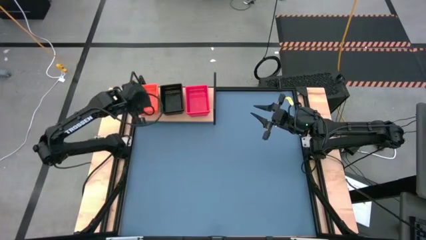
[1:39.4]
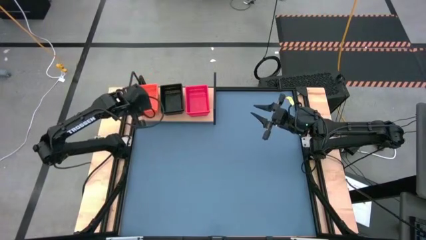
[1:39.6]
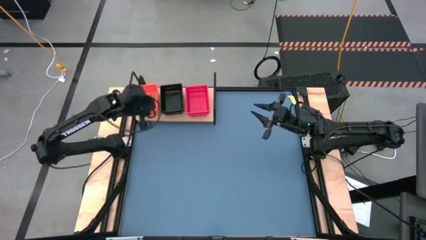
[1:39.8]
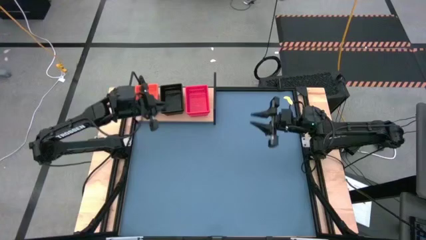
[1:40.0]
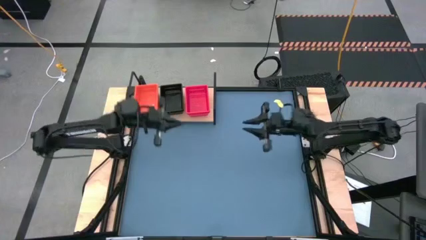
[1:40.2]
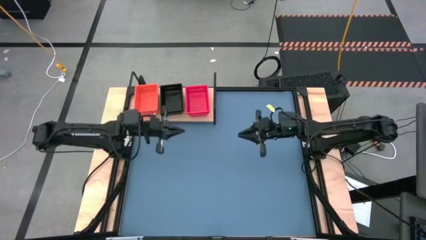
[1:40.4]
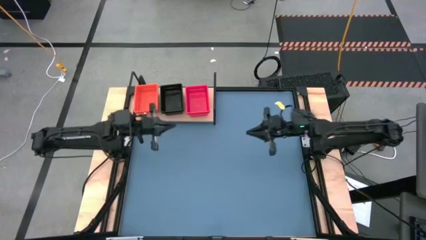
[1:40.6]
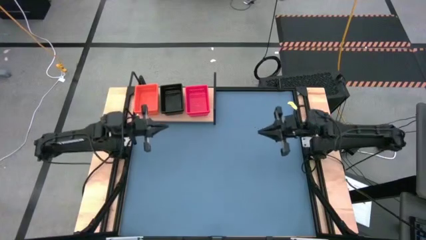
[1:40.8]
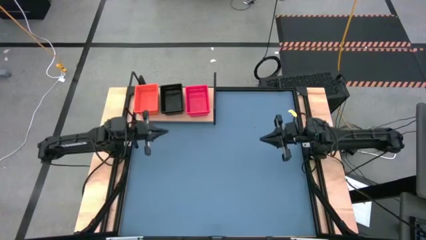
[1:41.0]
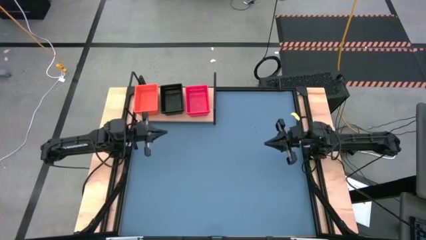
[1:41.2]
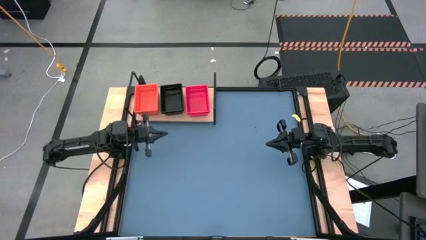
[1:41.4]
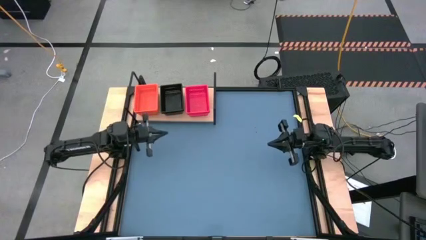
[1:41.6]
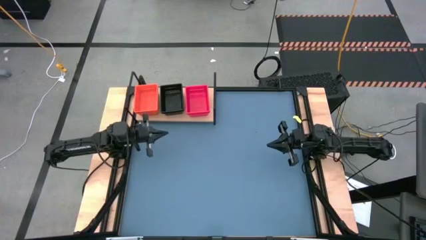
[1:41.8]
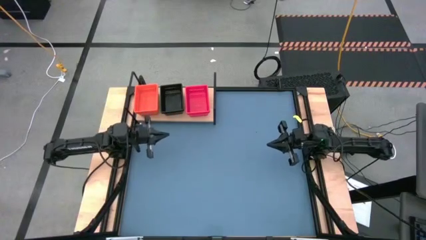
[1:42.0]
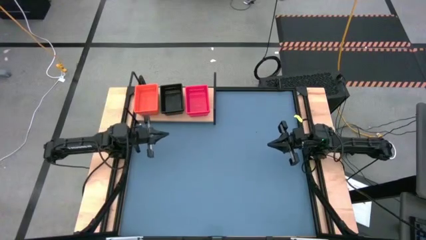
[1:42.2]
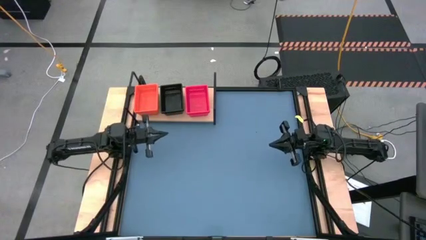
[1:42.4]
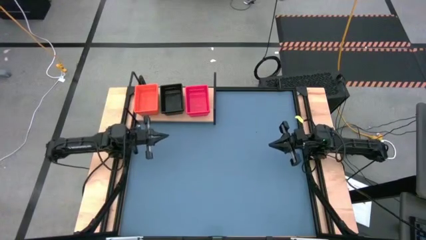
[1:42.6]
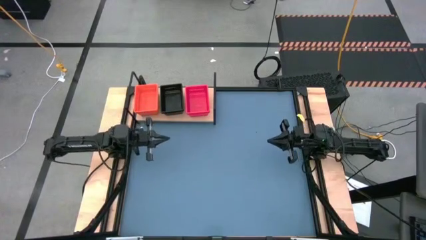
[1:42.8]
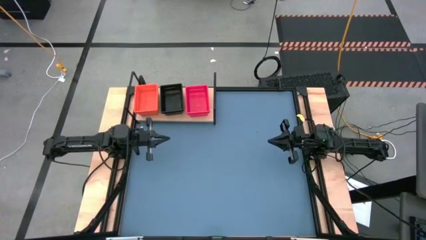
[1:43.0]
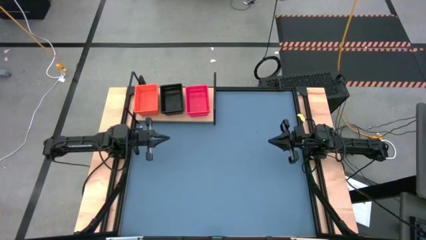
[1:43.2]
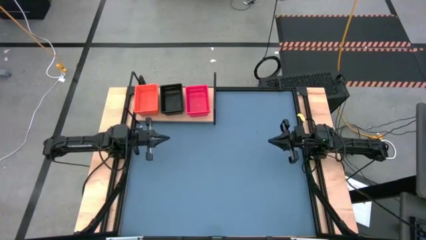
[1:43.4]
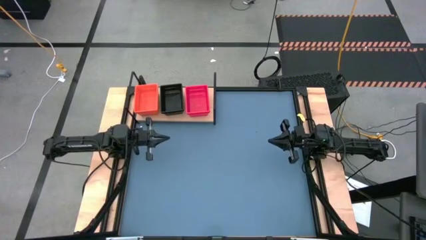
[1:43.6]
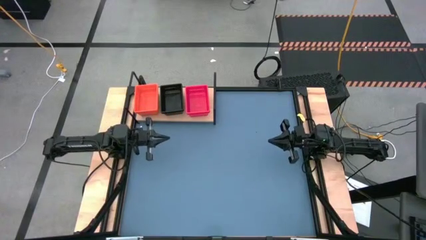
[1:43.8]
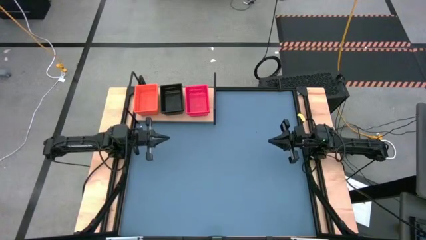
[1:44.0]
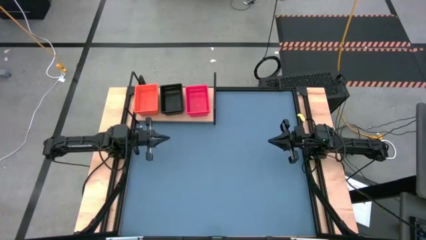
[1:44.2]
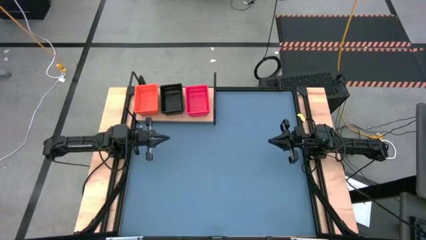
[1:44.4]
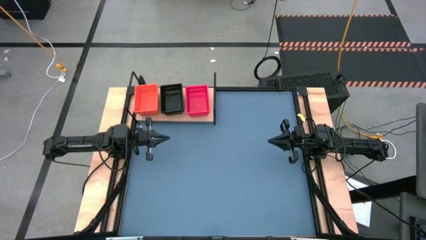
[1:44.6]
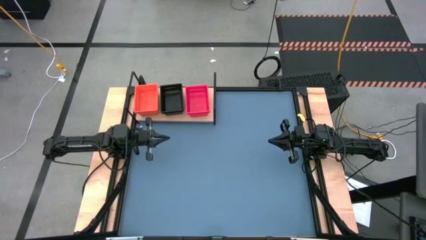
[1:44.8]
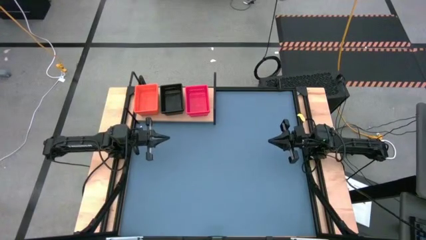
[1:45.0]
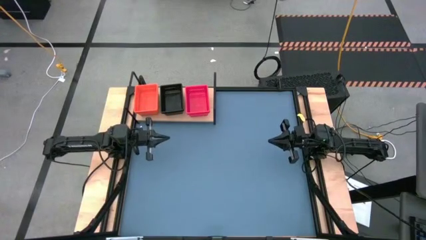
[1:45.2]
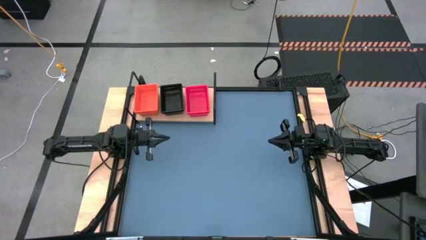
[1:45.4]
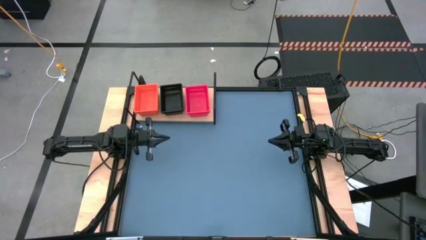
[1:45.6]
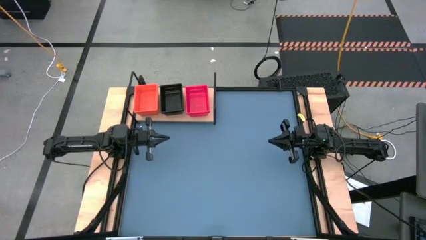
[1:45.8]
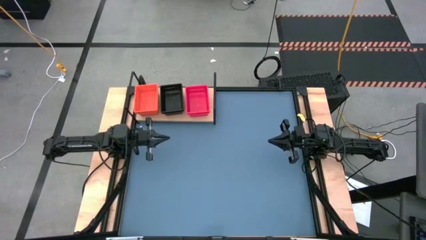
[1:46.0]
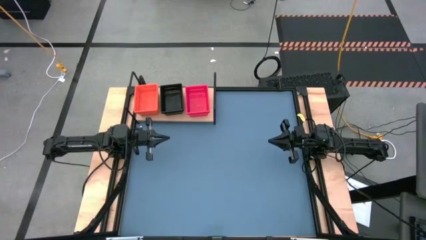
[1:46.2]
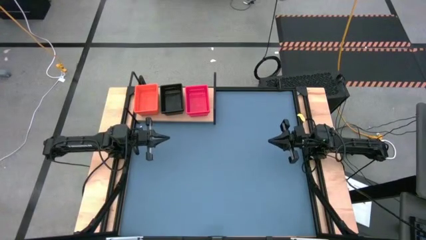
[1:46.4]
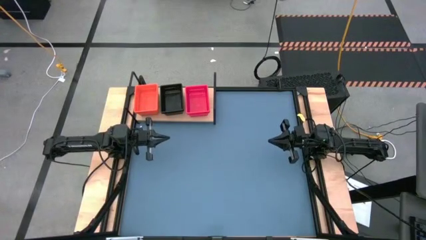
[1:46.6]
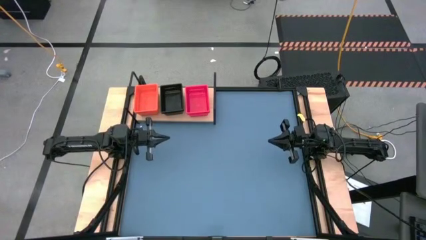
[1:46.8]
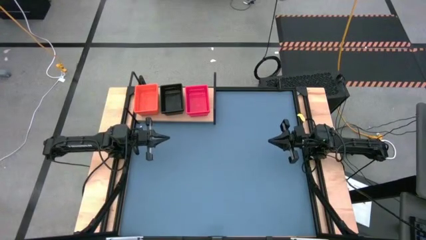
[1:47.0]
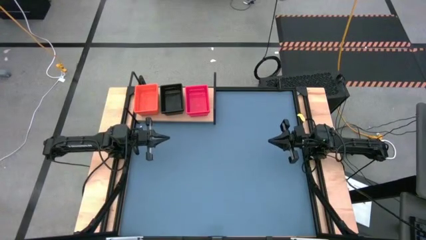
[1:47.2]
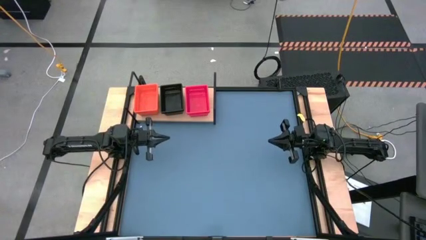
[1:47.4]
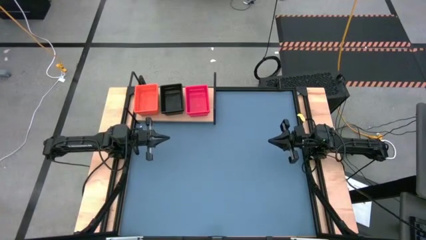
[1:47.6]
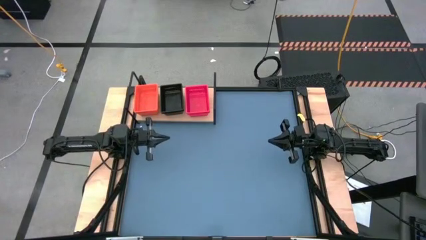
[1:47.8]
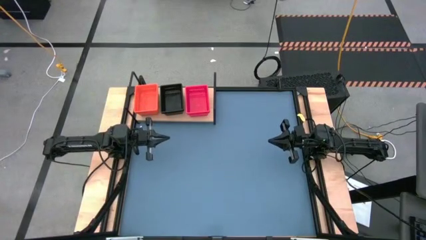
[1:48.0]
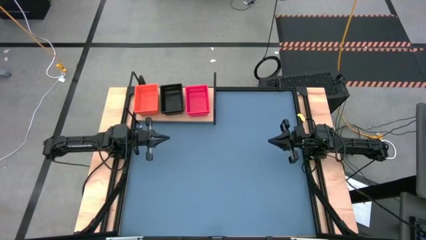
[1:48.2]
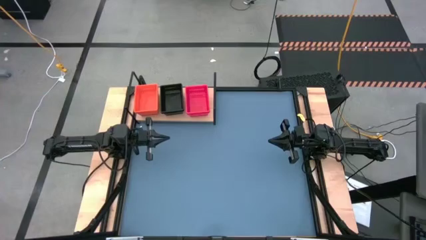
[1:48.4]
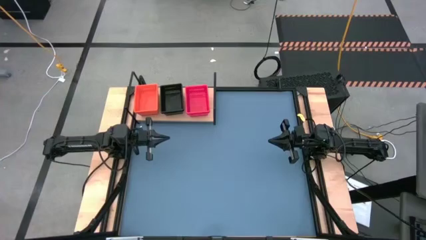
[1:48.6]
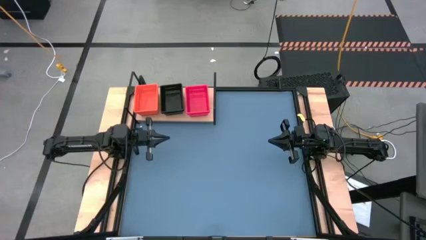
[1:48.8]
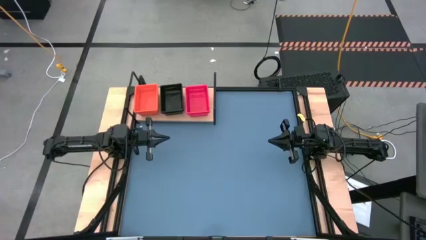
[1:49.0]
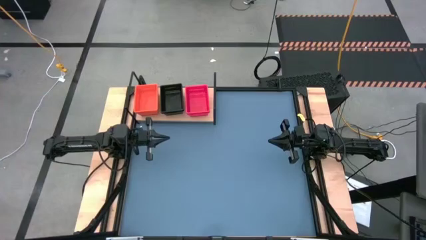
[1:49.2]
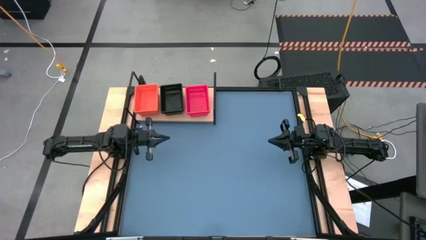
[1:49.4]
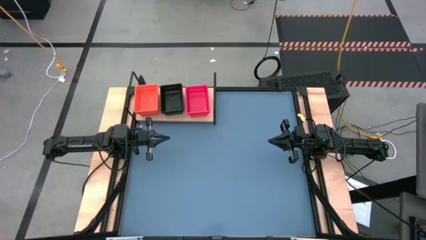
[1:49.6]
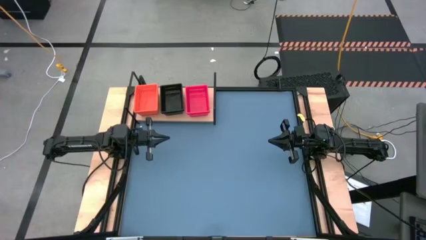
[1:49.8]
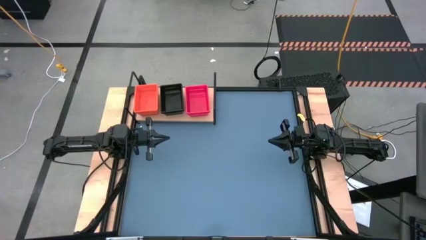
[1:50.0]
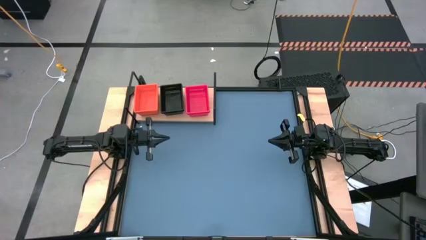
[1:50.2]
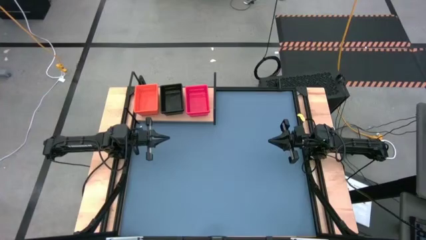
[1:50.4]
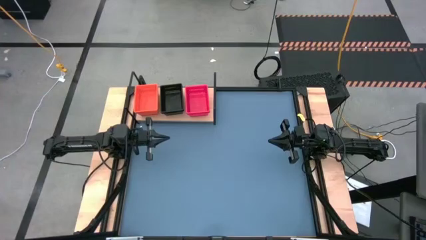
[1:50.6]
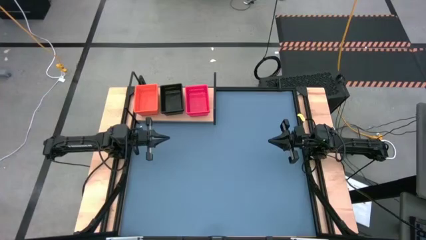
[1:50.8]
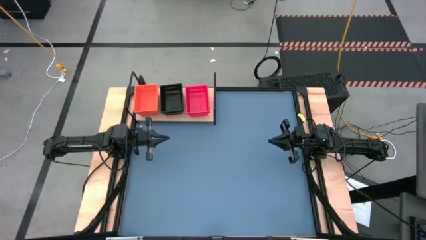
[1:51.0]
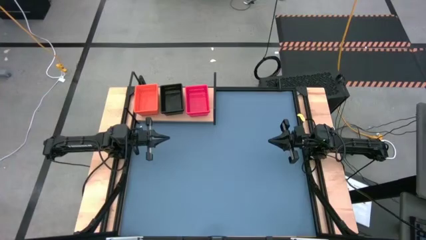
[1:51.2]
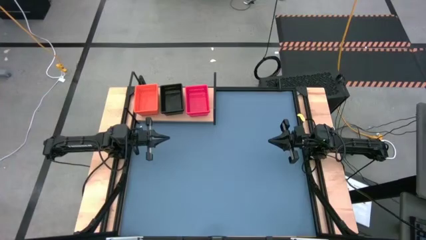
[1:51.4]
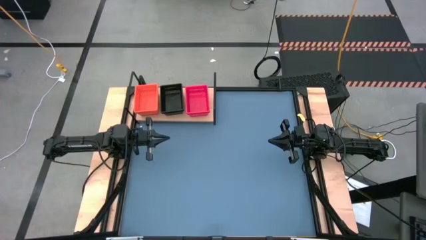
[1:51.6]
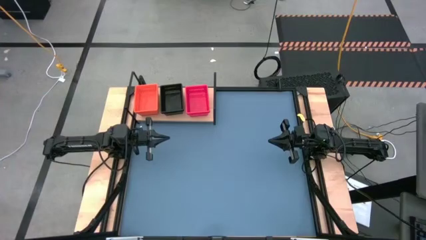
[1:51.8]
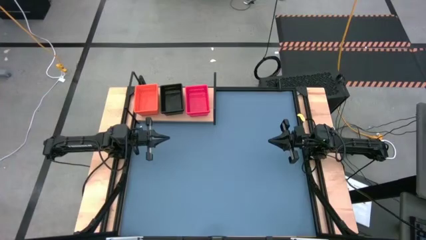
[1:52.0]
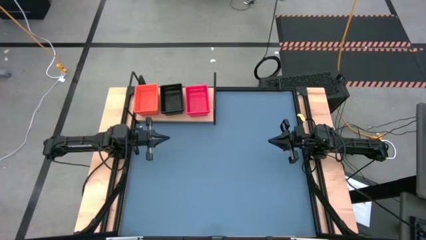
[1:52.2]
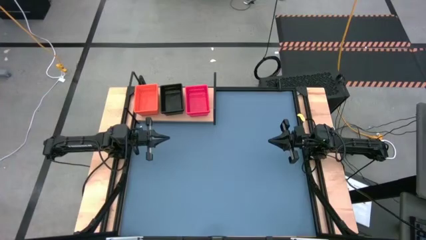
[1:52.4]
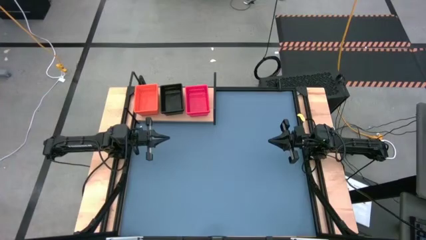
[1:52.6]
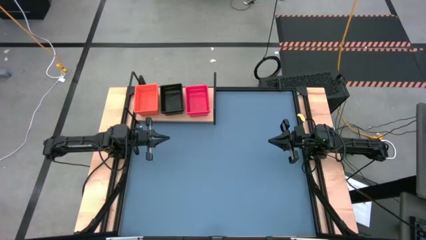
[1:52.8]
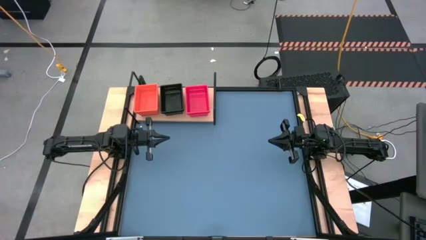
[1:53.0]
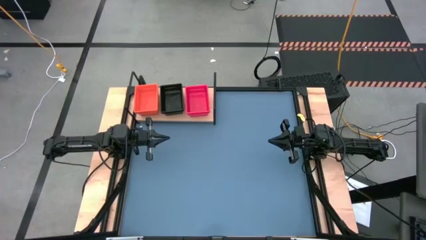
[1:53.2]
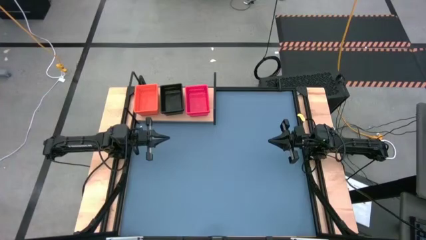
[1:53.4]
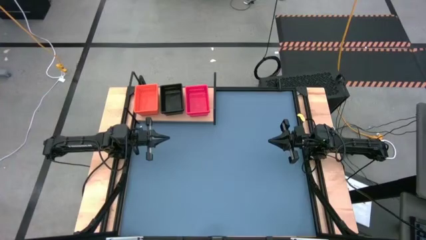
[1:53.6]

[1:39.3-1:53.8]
Task: Stack baskets on shelf by color
Return to Home Position

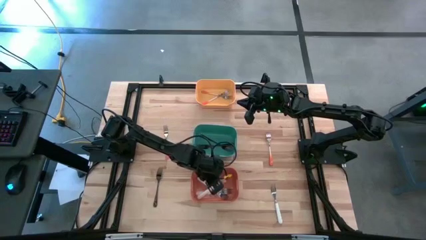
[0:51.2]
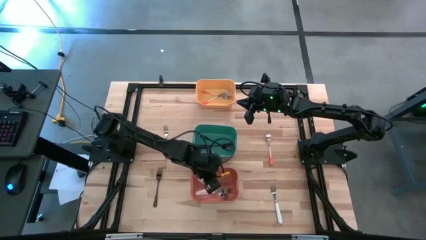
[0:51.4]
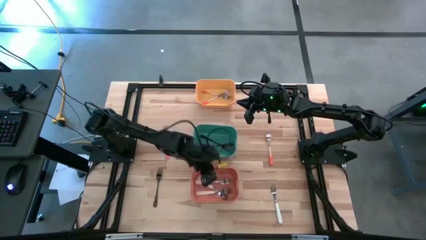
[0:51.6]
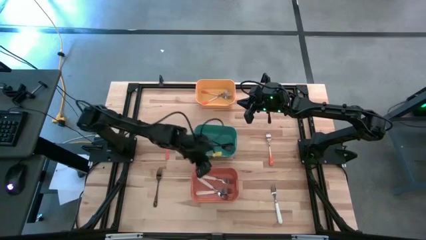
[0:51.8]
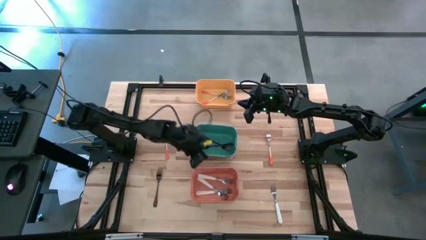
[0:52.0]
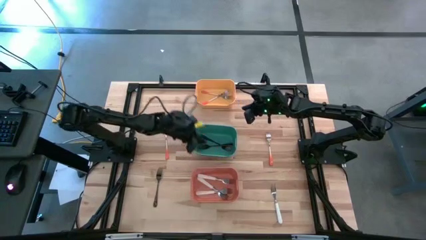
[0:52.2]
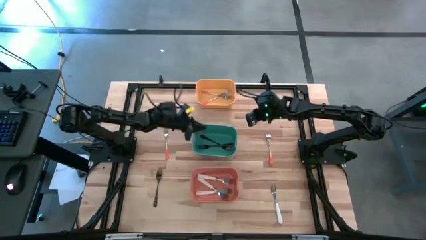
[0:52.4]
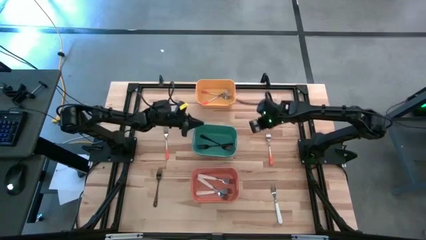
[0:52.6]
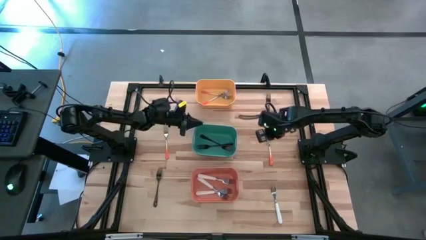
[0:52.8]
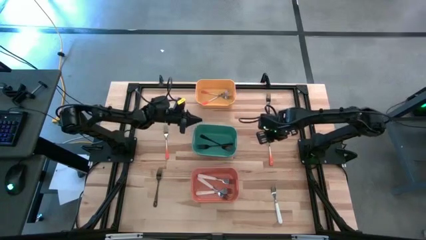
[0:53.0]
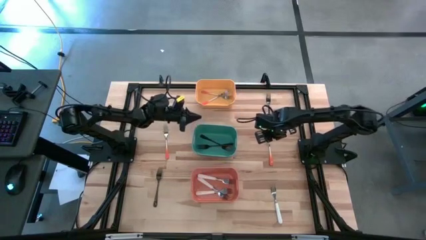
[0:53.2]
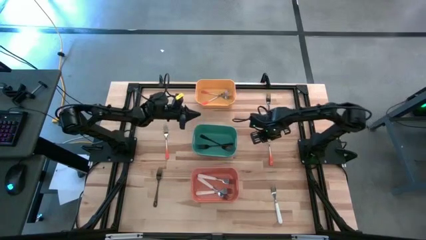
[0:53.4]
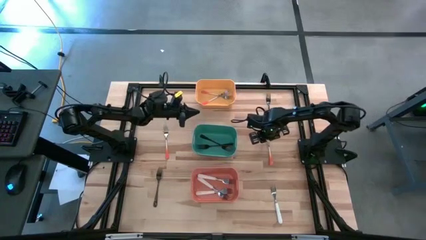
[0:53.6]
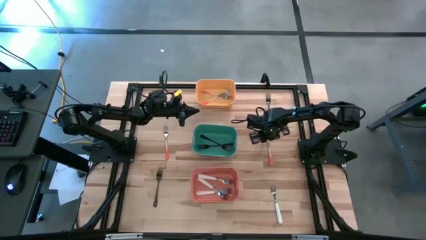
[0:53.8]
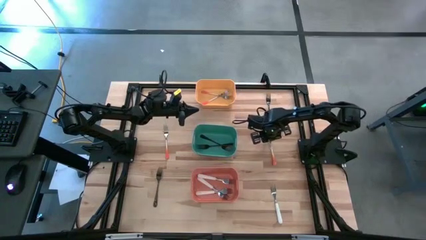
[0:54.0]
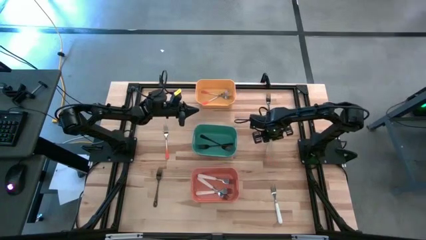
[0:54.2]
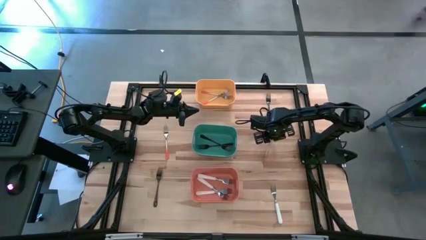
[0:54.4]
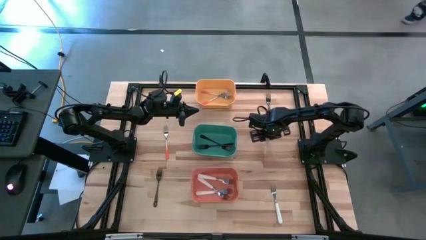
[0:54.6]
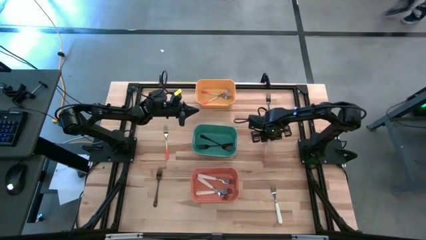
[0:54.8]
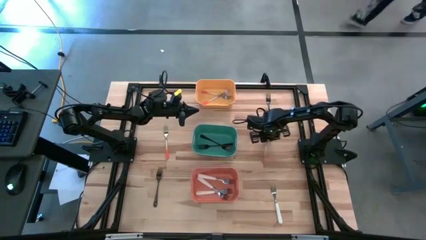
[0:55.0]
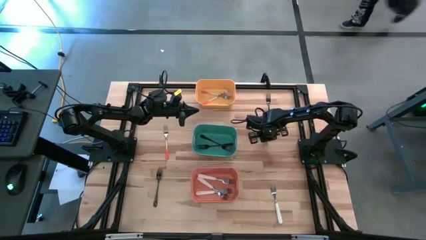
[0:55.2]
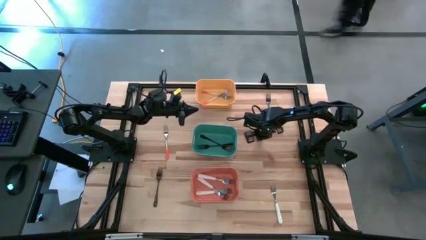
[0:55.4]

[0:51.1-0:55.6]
Task: Sort silverware by color (type)
Put the orange fork into the yellow bin
